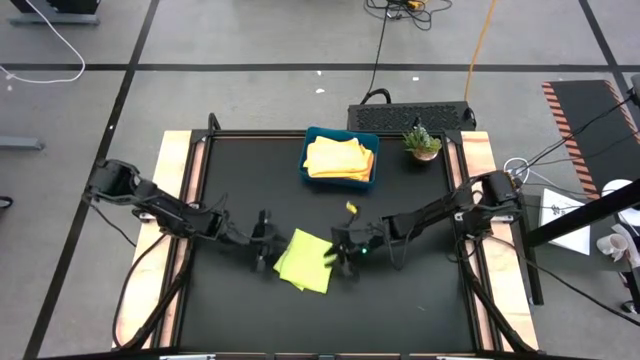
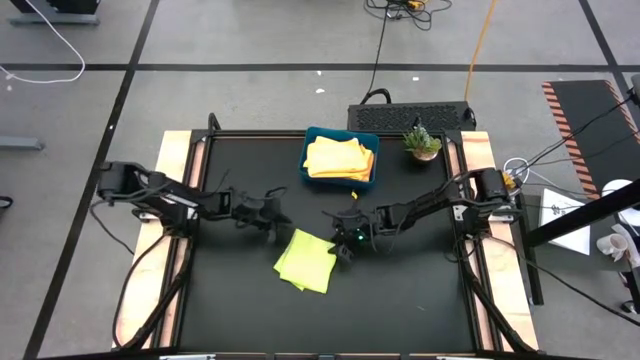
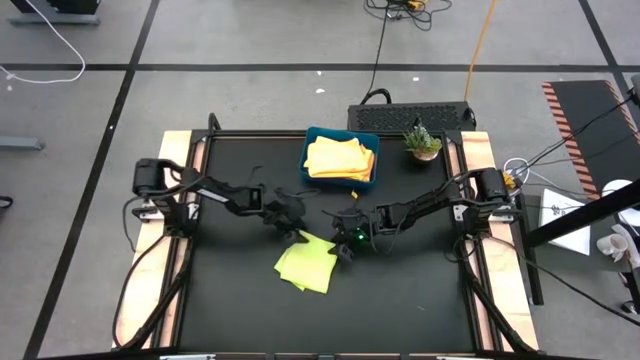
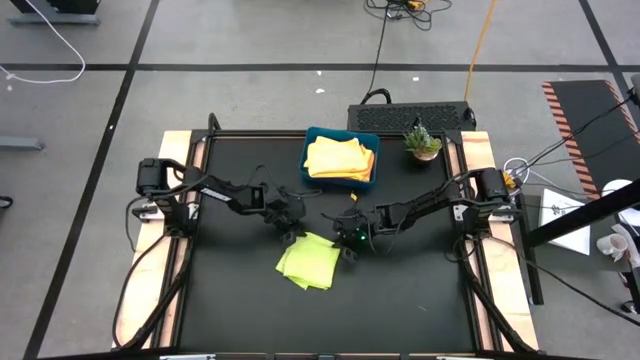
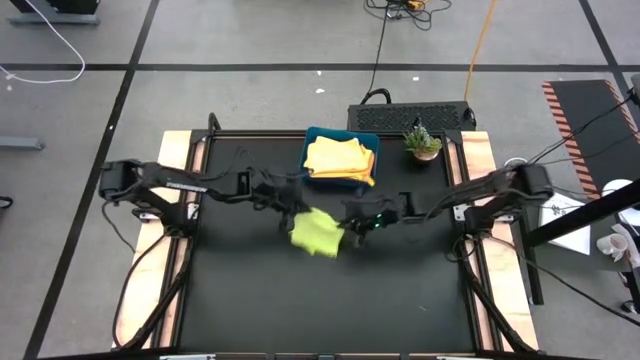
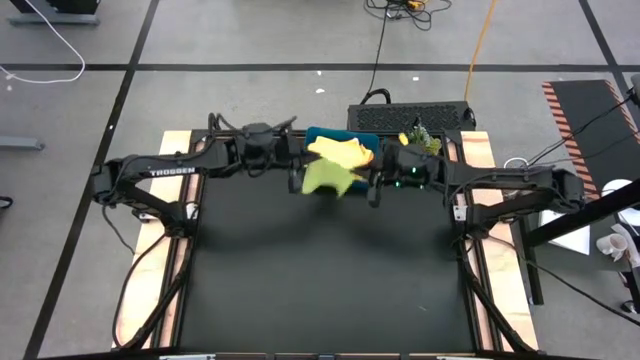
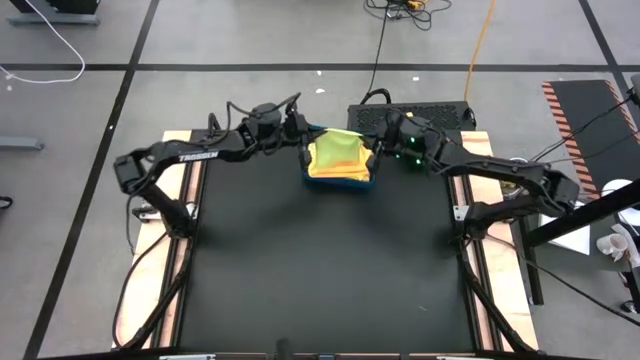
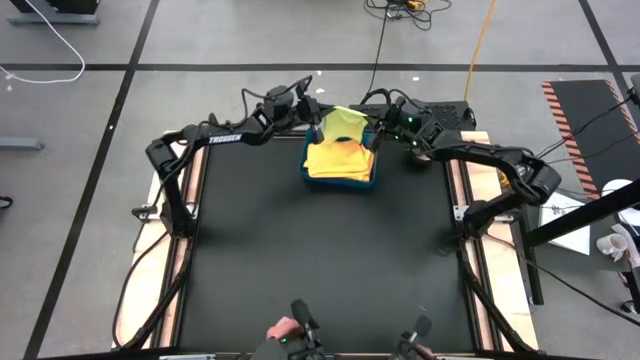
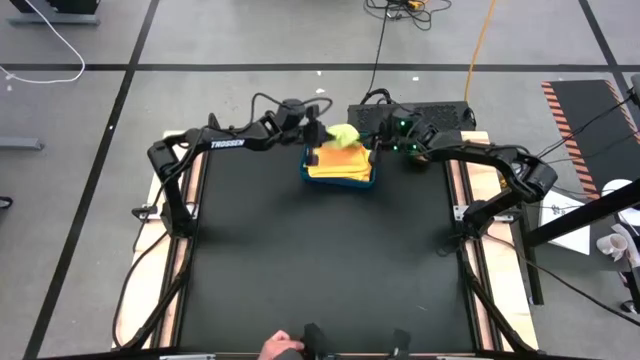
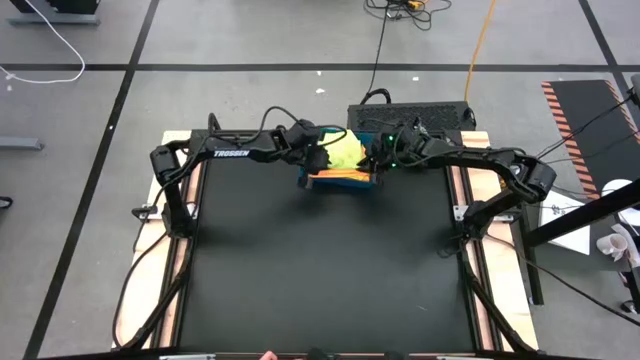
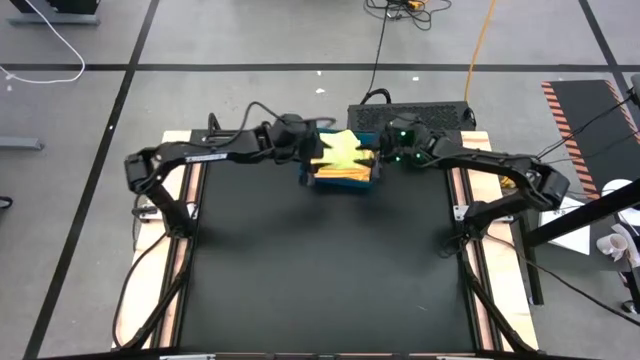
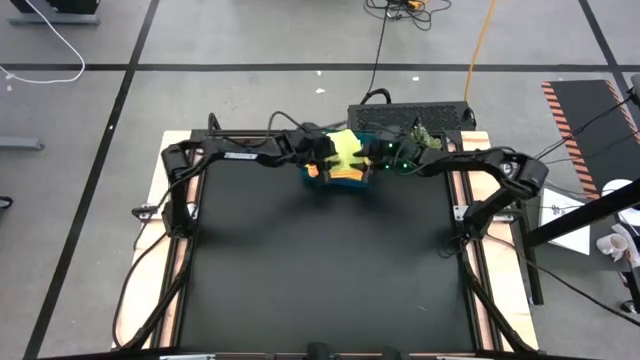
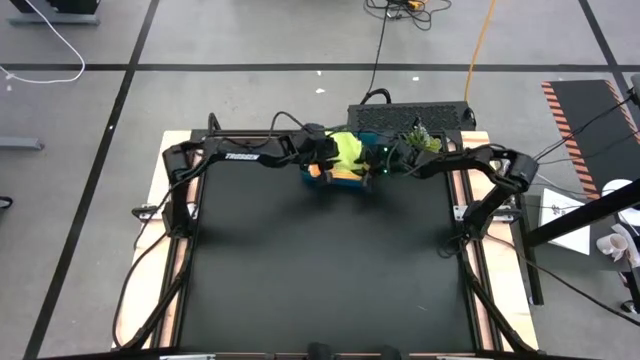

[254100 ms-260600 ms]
Task: Fold microfiber towels
Put the green microfiber cloth into the dark blue bin

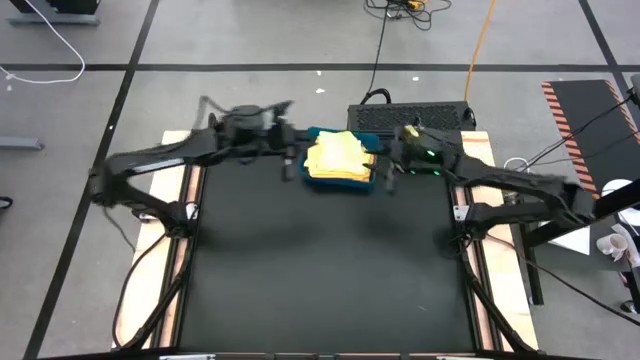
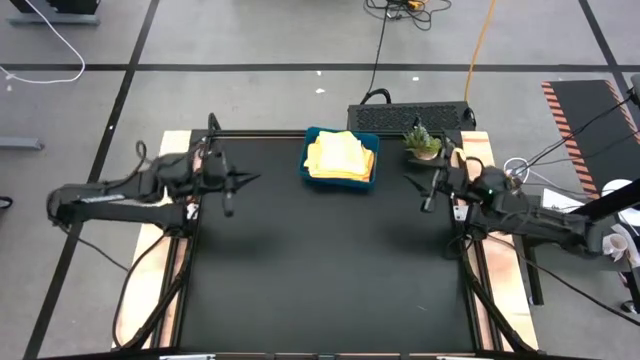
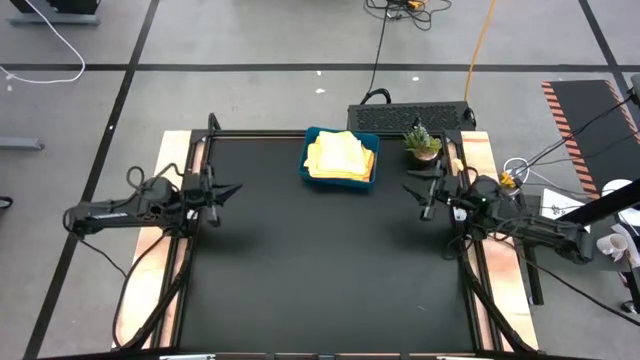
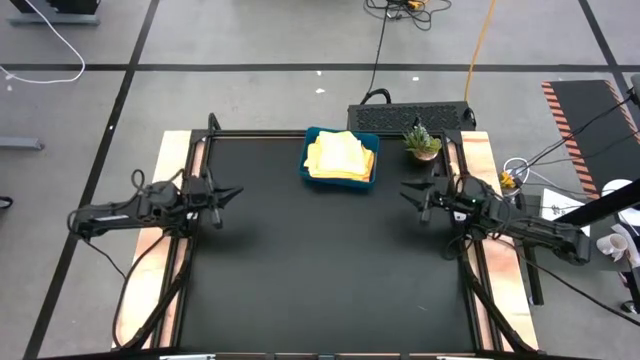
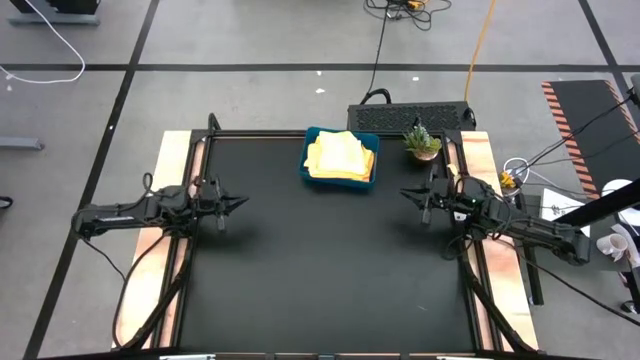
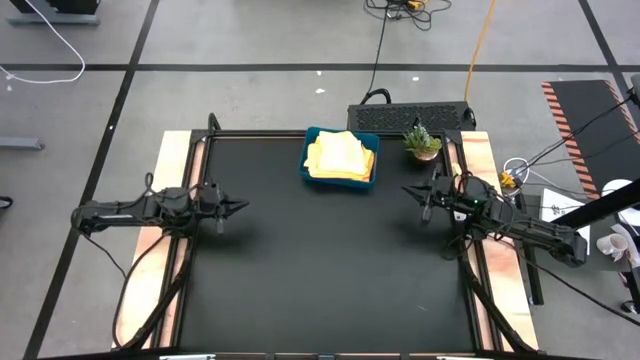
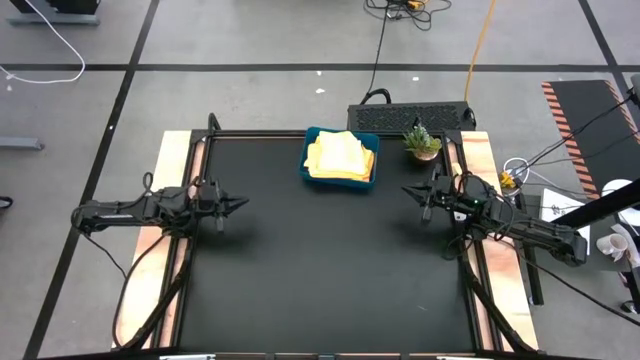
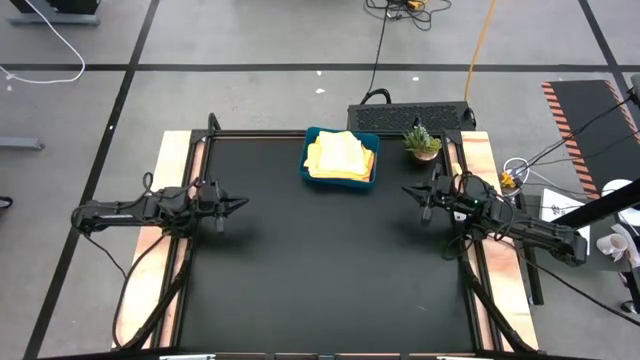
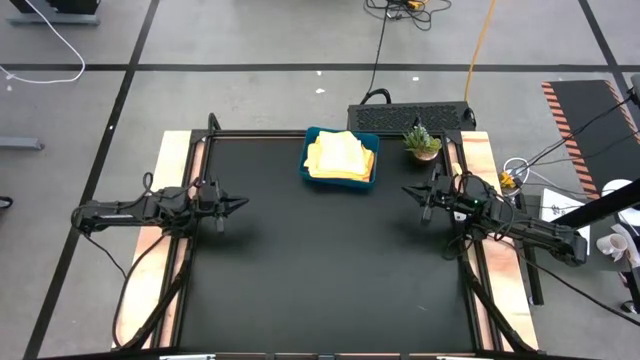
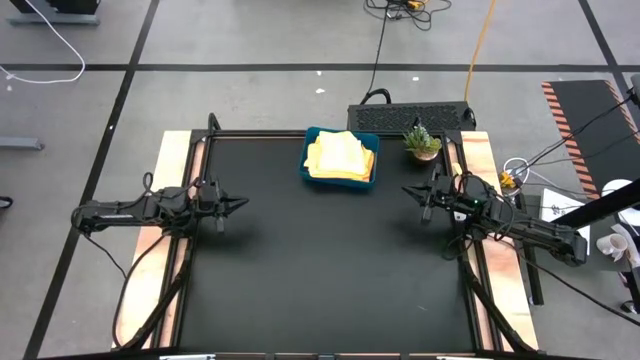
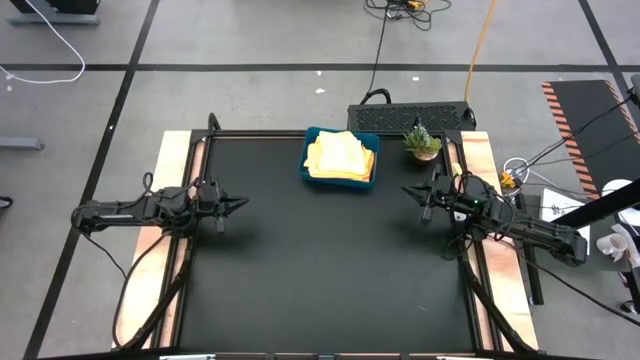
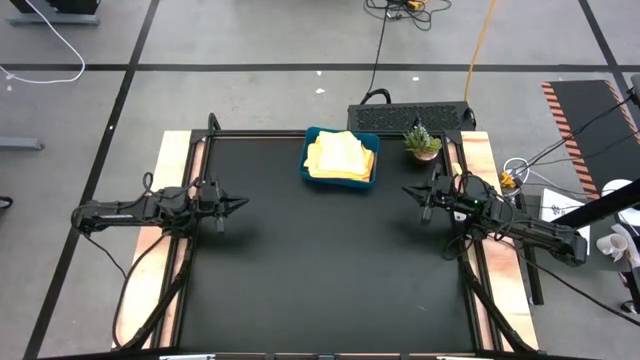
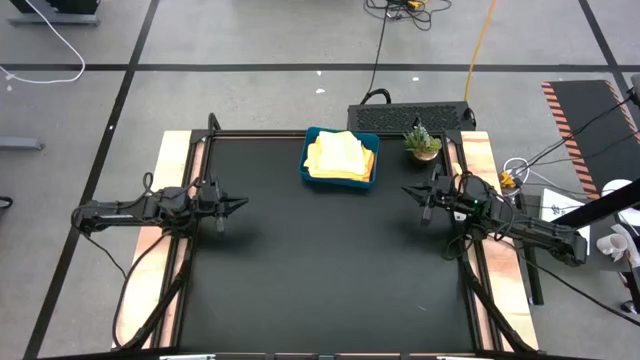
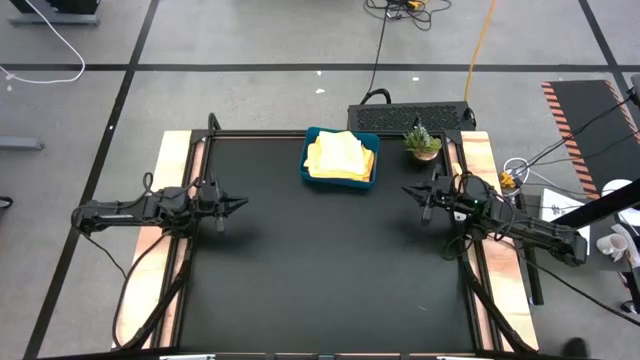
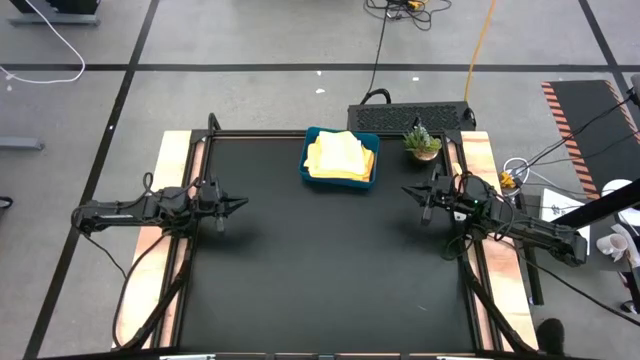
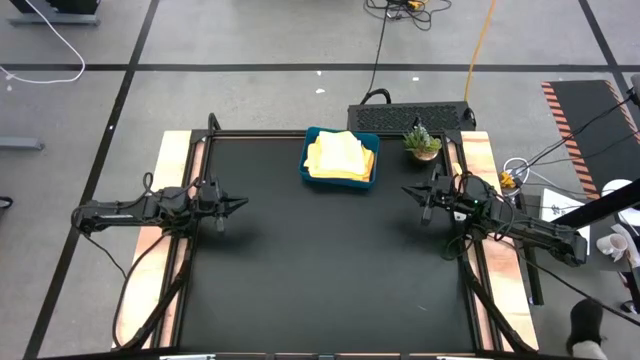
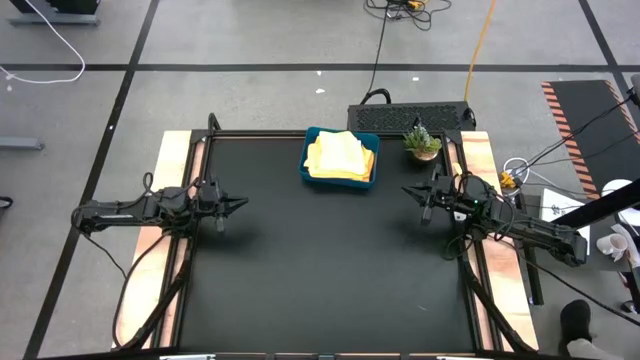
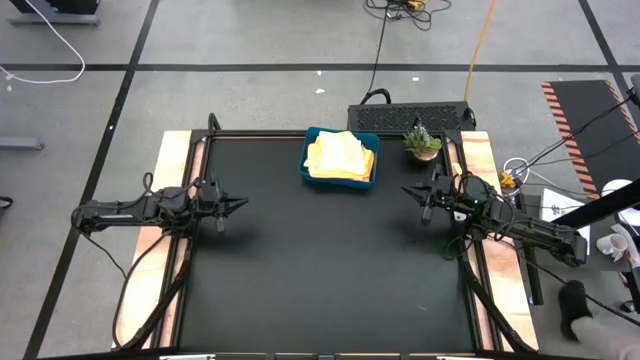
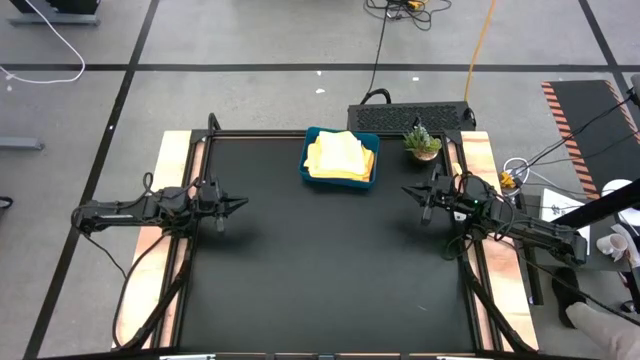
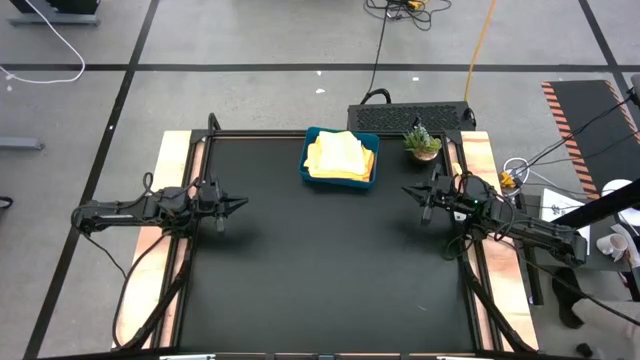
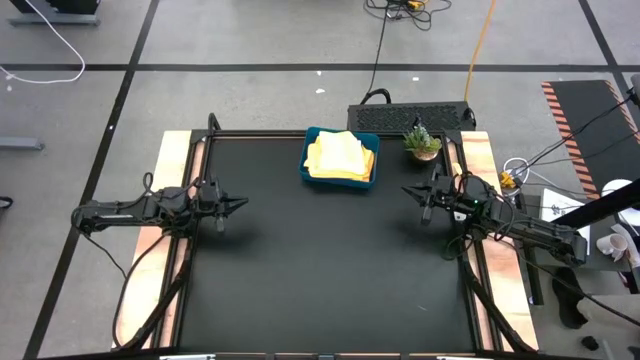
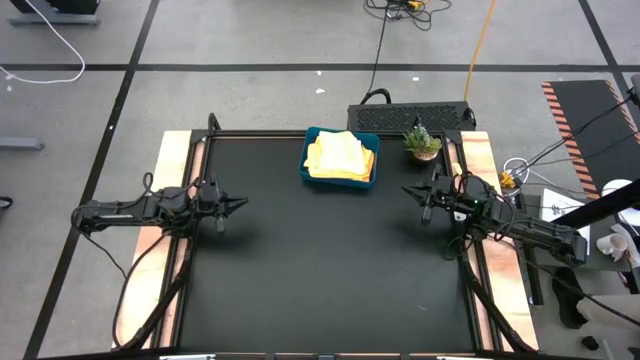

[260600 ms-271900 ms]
Return to Home Position

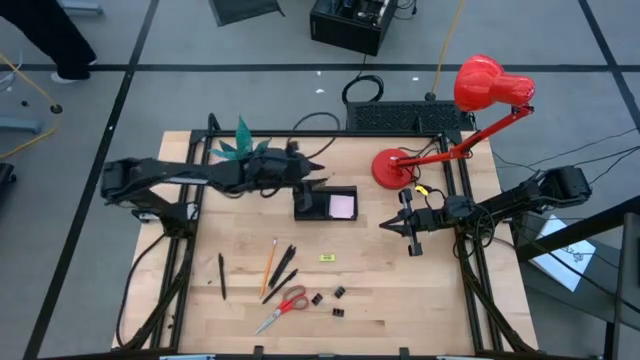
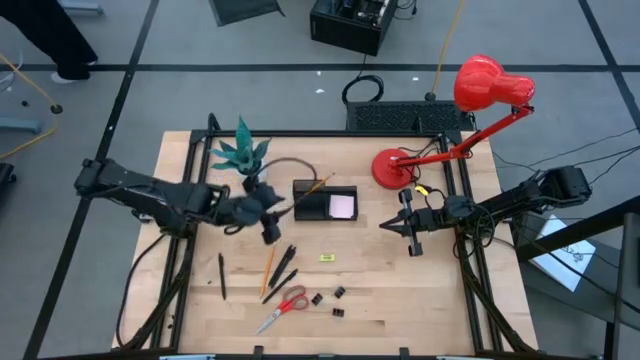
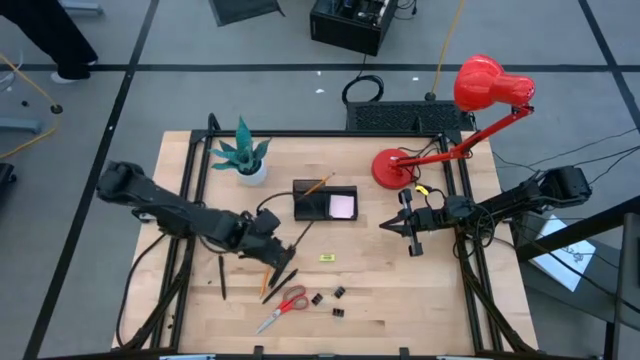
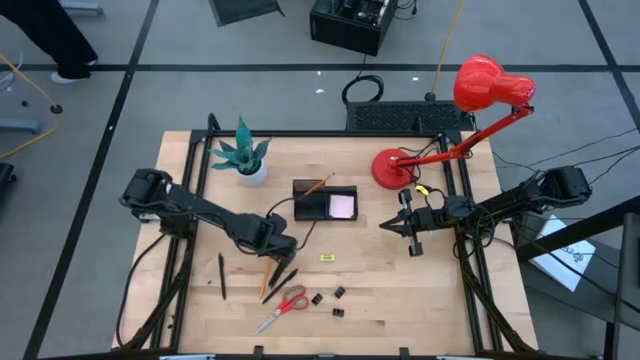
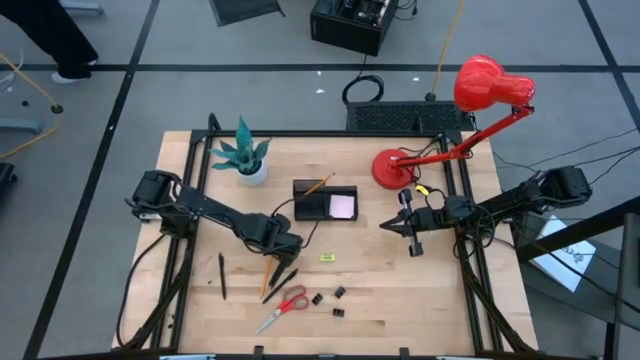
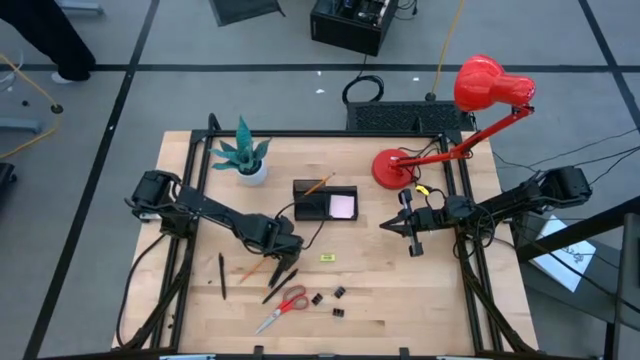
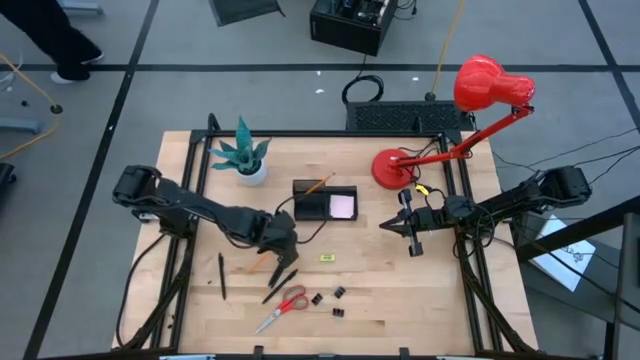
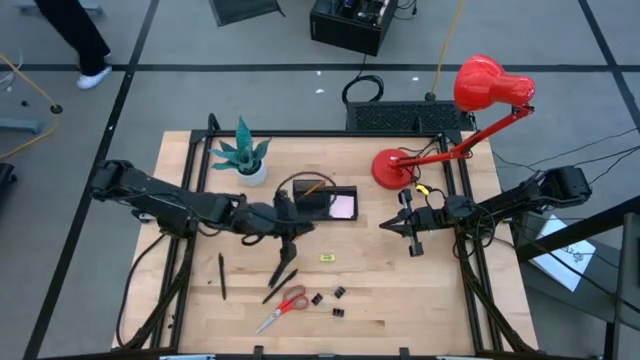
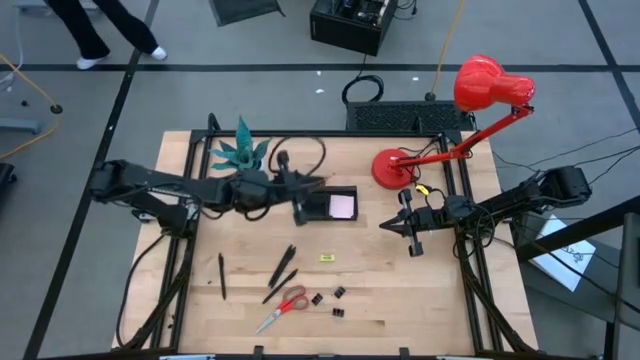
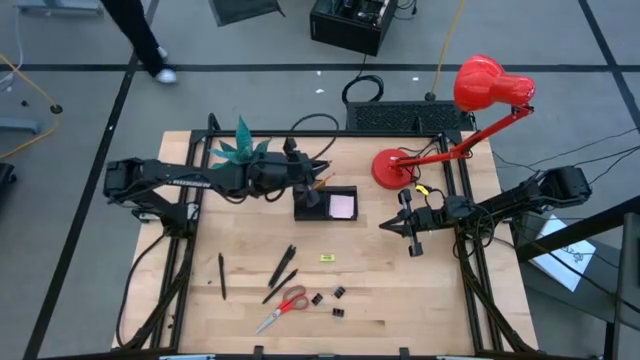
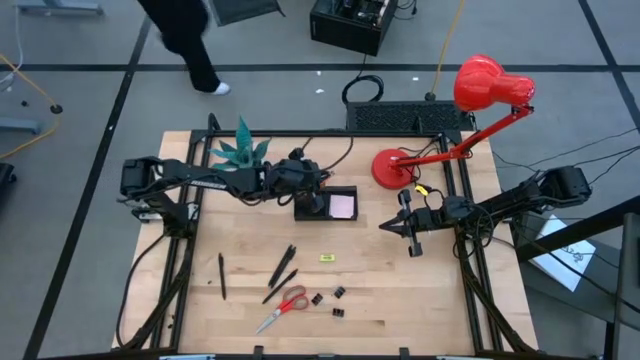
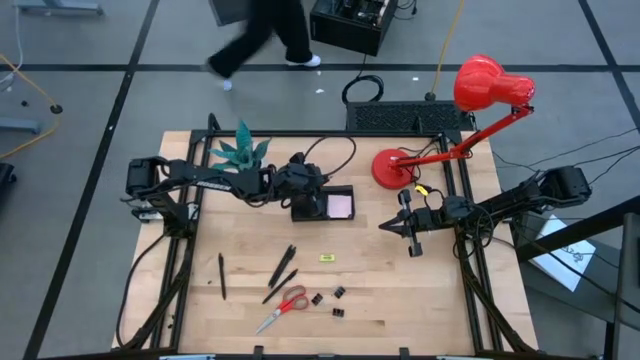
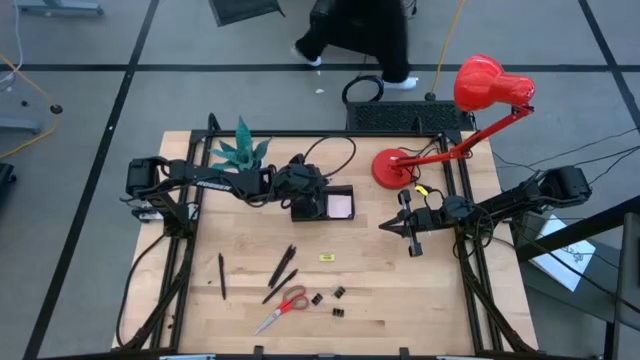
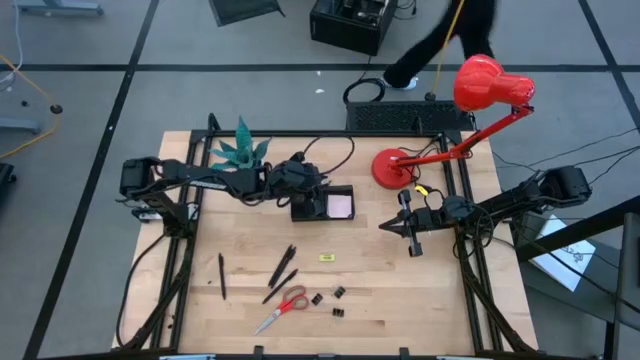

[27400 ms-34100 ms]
Task: Pick and place office supplies into organizer
Put the orange pencil into the black desk organizer
